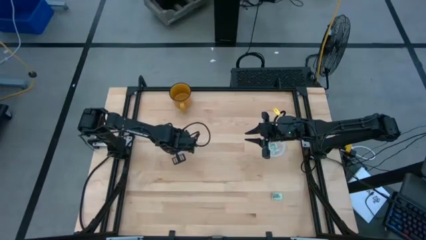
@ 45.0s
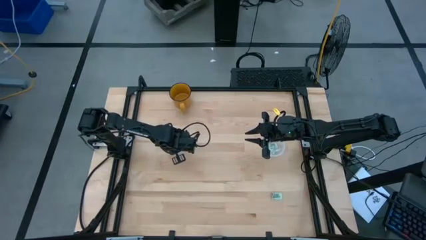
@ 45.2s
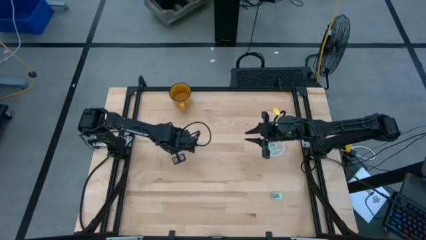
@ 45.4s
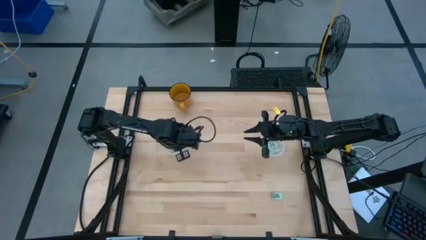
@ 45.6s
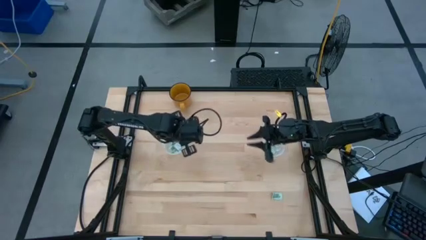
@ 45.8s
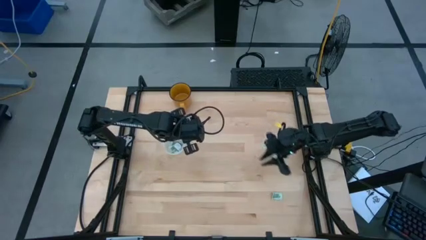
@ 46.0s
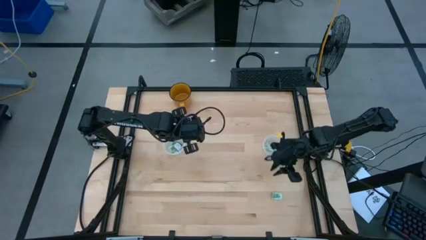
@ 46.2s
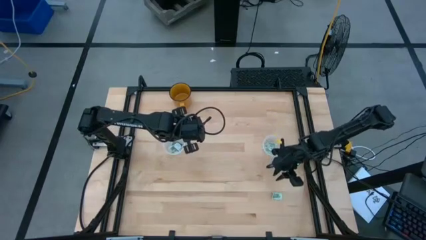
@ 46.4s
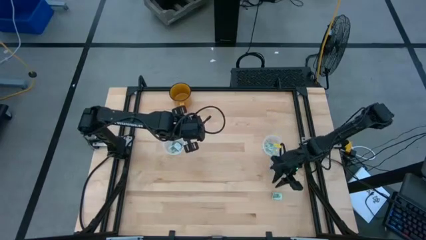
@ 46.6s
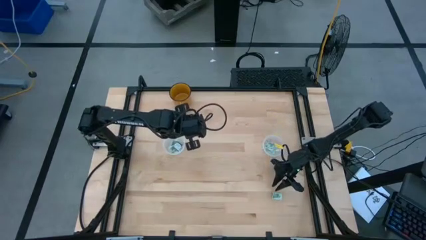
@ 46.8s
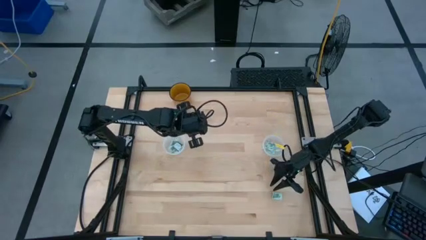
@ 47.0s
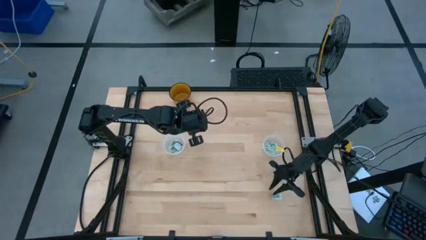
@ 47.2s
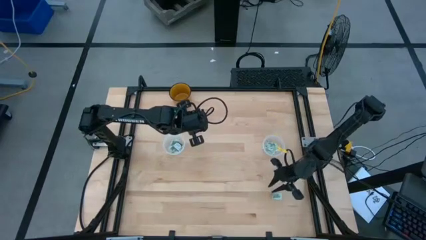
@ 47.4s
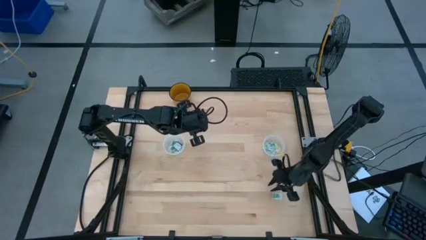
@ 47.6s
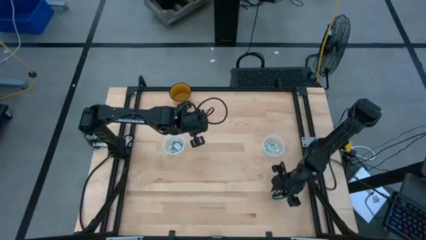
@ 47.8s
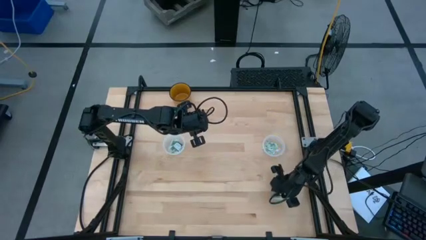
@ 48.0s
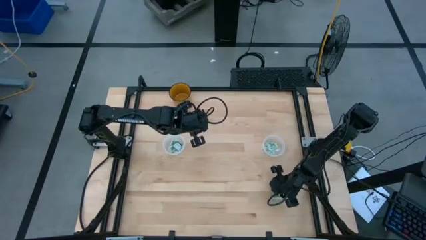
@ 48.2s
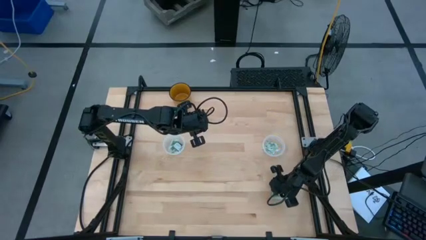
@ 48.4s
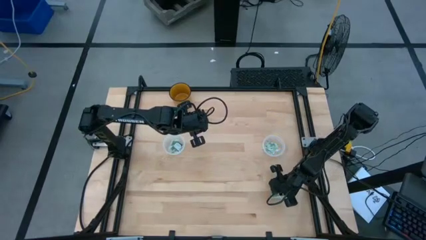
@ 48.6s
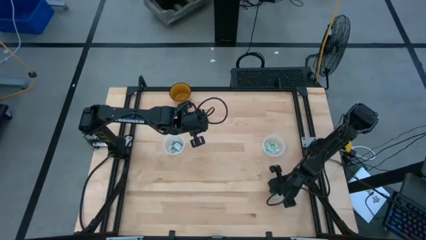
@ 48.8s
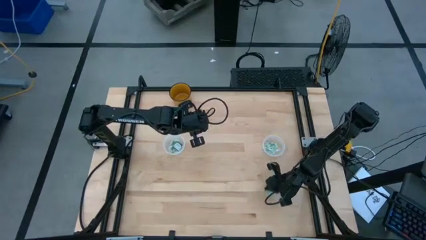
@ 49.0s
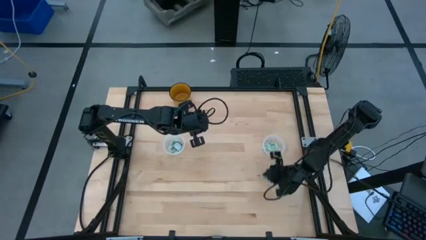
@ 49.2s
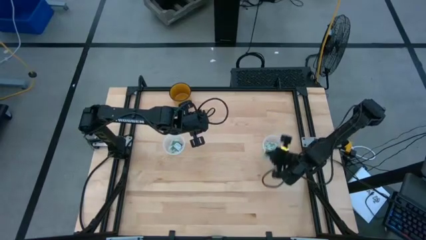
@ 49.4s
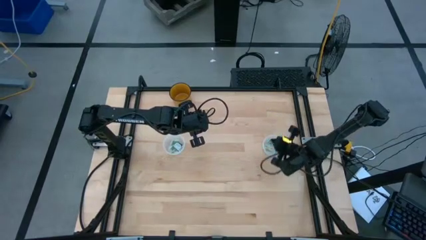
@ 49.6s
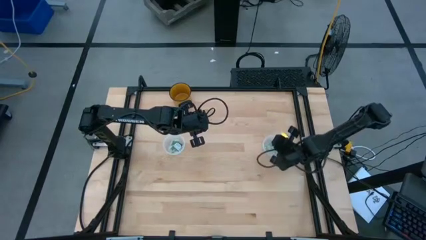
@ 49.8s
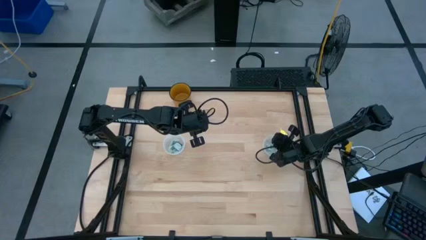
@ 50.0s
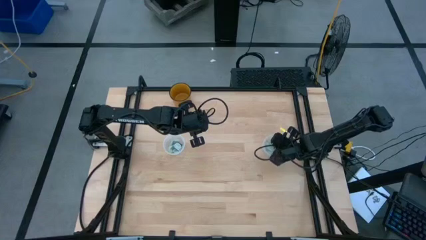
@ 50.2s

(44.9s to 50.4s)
Task: Pick and place items into bin
Put the stevia packet into the right transparent bin

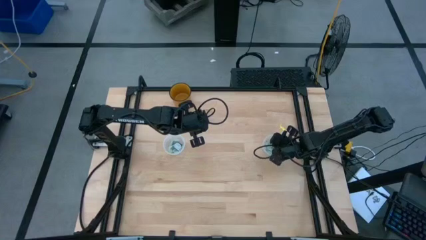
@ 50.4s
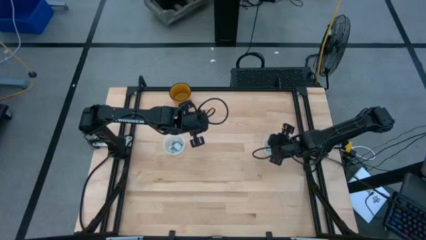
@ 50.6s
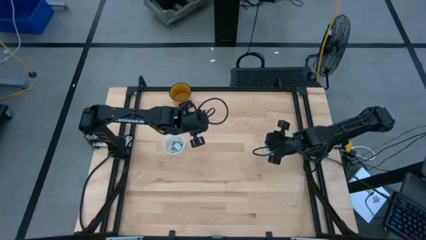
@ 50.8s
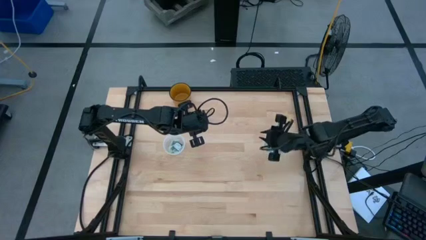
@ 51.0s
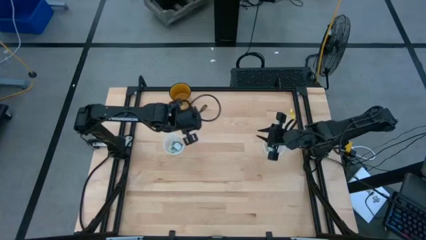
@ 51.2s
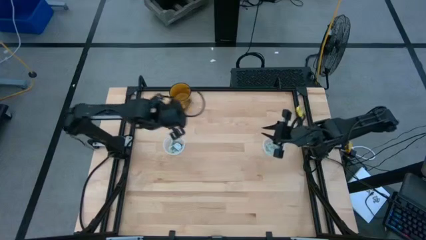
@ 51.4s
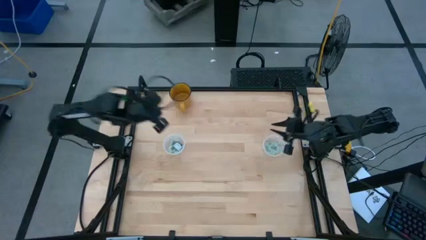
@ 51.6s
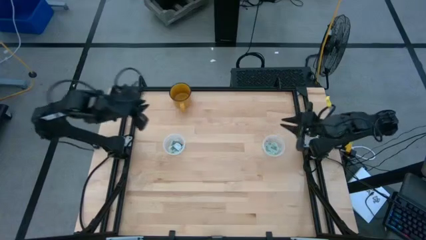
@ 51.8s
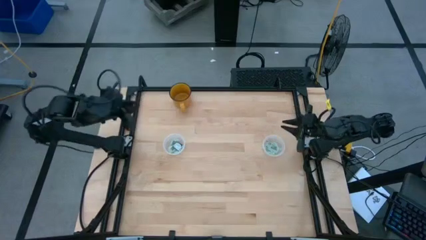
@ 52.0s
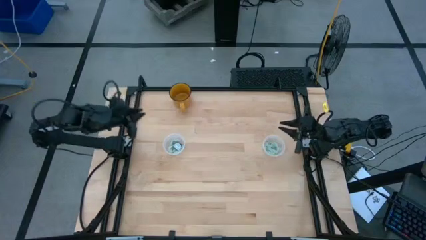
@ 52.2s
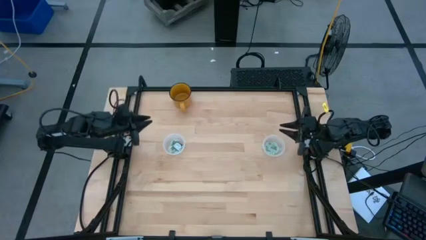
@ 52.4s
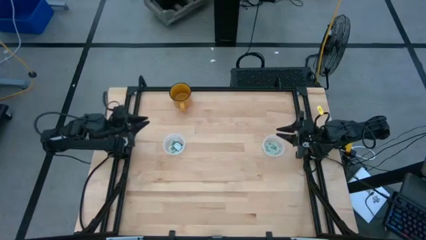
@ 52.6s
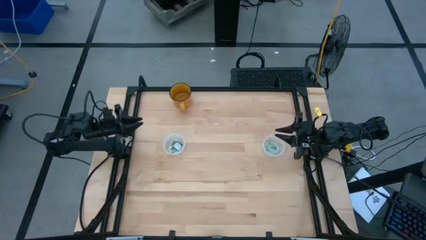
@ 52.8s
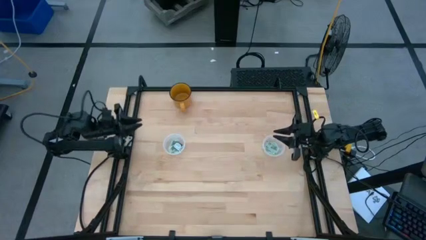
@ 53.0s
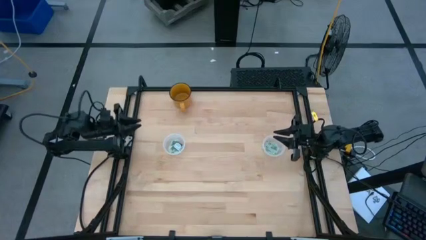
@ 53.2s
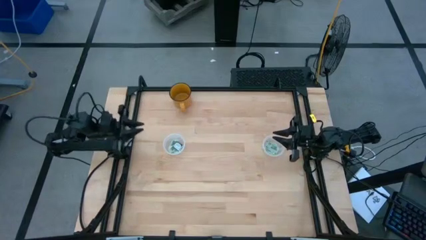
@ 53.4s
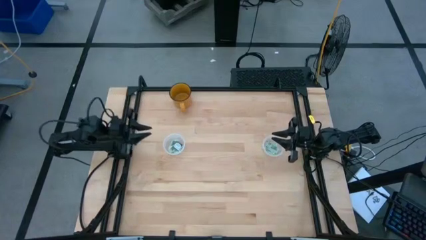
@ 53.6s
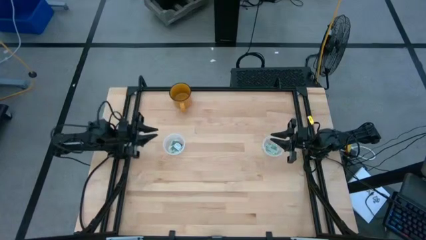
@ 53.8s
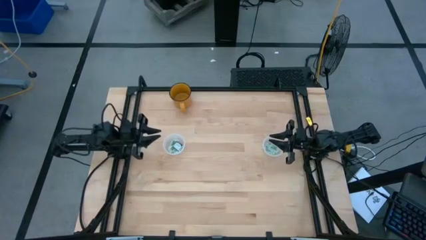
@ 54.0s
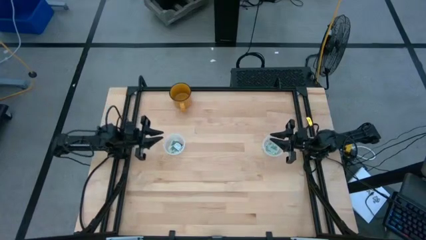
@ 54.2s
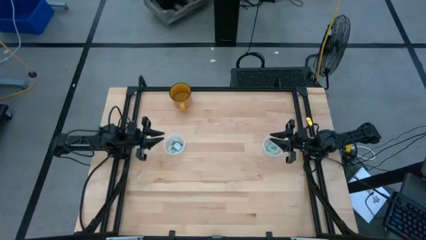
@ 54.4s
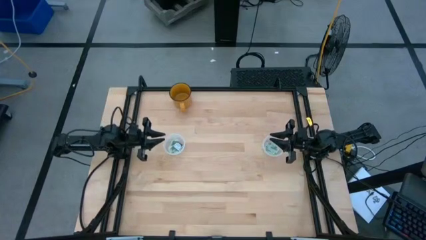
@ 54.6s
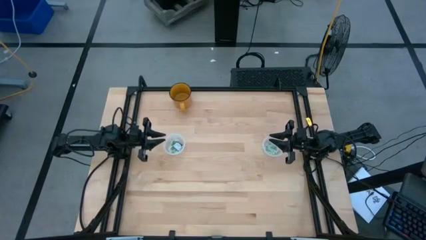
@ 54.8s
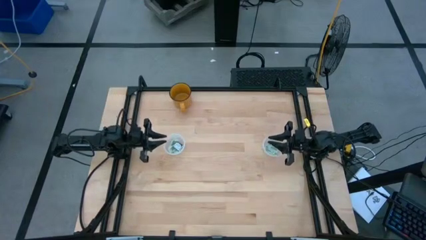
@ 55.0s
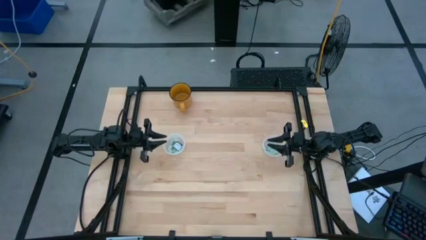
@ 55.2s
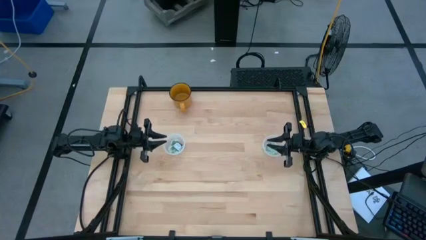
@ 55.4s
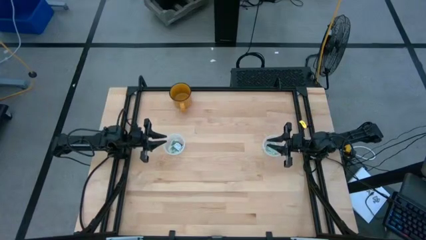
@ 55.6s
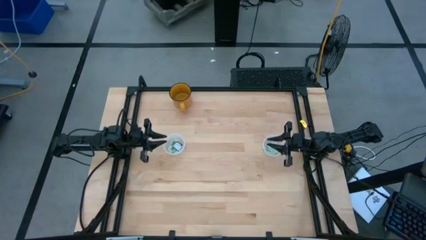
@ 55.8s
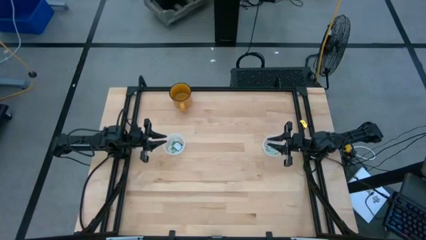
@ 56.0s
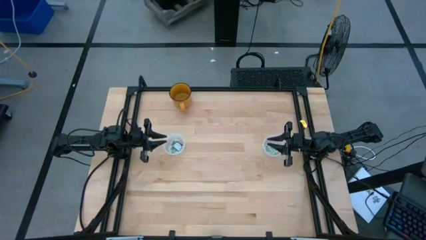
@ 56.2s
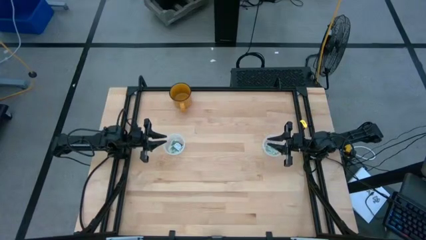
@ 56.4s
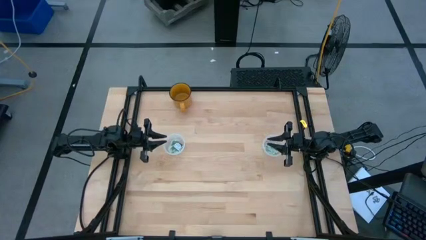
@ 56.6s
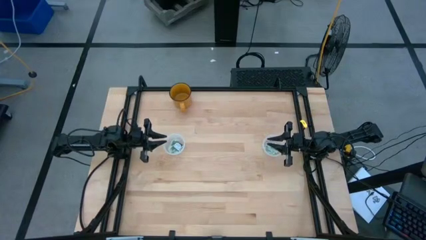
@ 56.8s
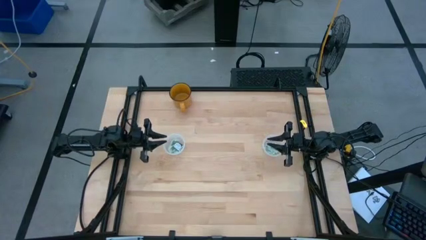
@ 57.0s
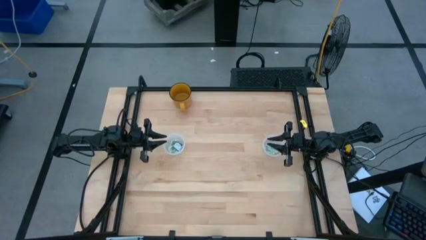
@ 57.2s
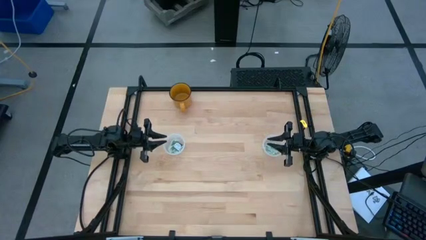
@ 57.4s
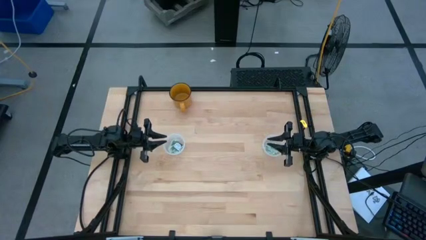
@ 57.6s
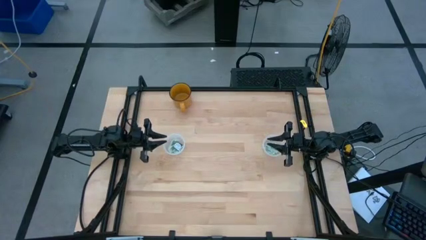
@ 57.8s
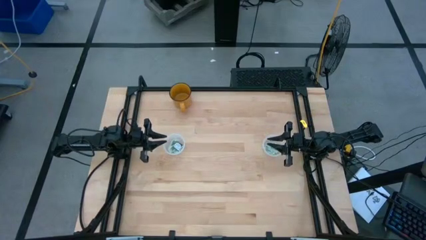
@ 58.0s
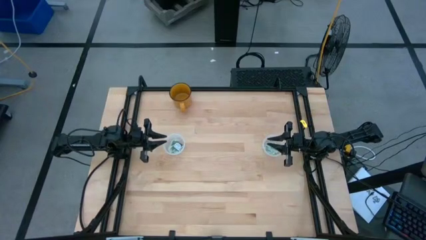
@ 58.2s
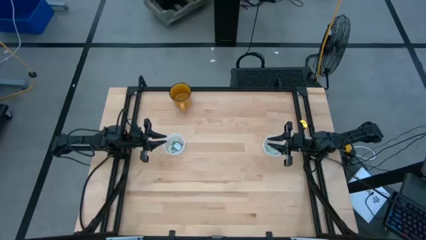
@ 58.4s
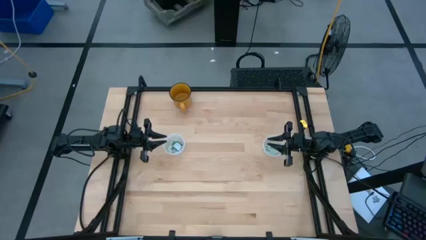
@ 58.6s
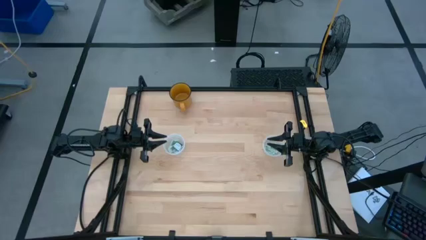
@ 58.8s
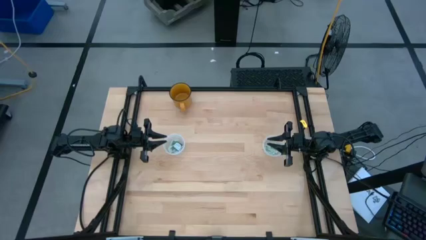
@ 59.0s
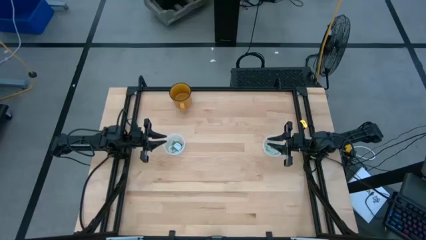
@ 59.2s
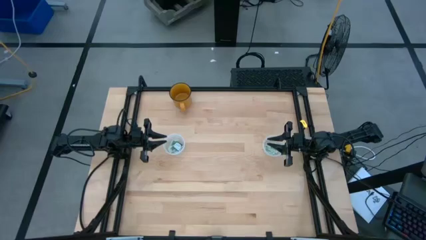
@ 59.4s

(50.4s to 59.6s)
Return to Home Position

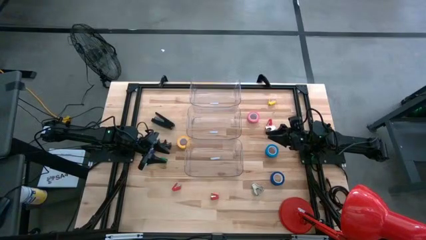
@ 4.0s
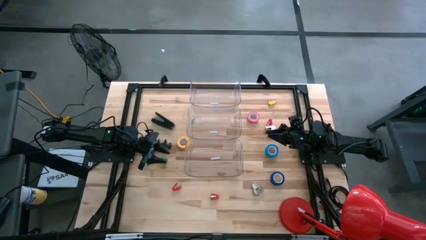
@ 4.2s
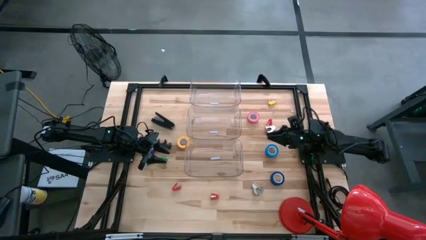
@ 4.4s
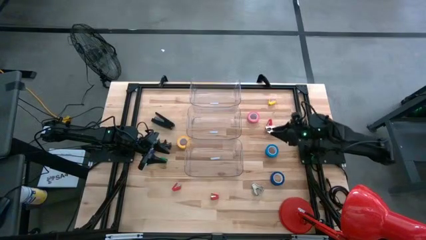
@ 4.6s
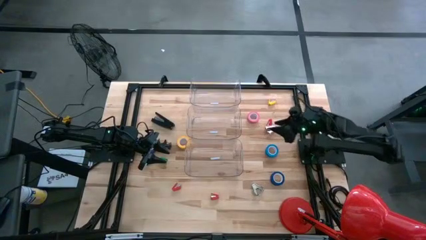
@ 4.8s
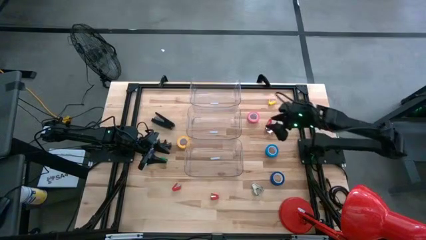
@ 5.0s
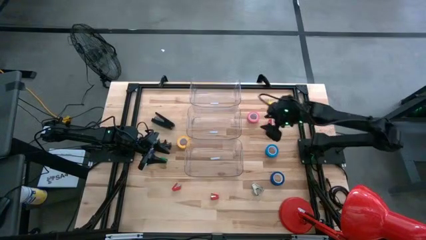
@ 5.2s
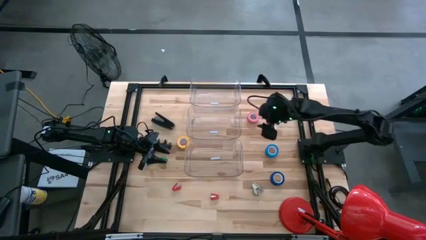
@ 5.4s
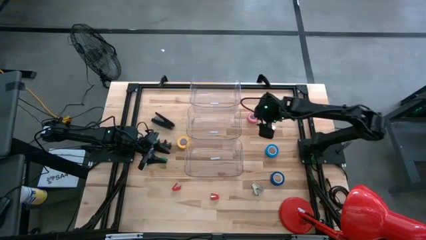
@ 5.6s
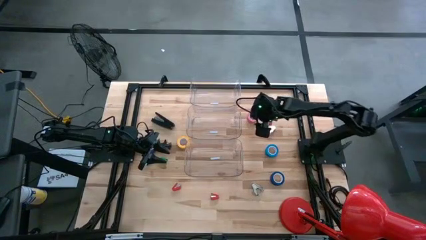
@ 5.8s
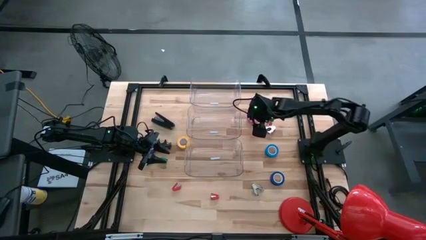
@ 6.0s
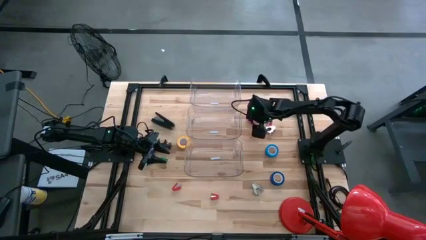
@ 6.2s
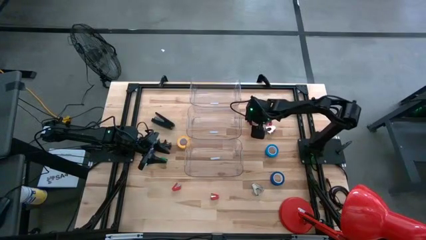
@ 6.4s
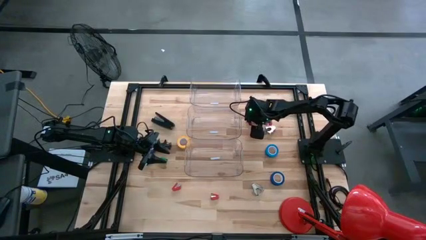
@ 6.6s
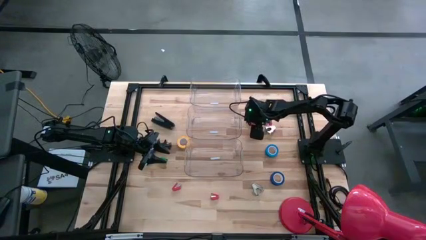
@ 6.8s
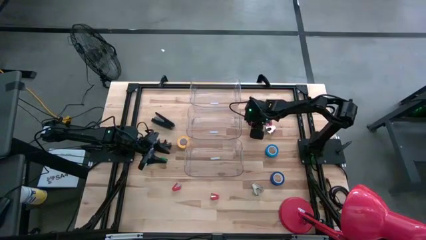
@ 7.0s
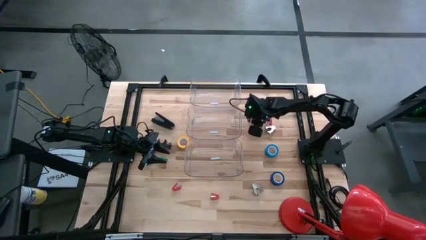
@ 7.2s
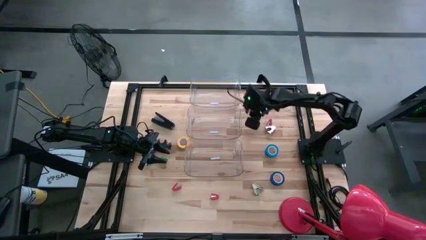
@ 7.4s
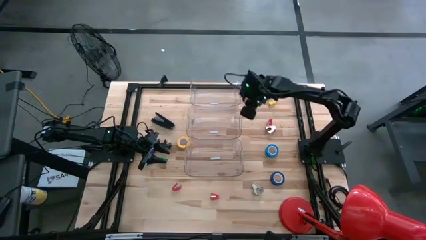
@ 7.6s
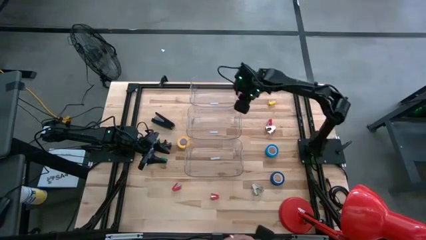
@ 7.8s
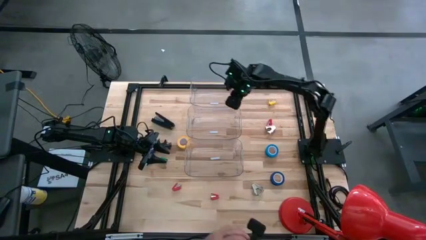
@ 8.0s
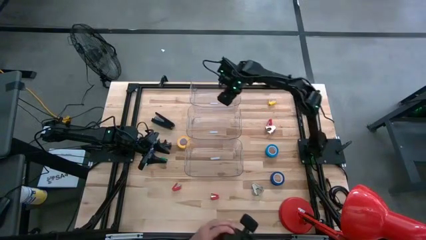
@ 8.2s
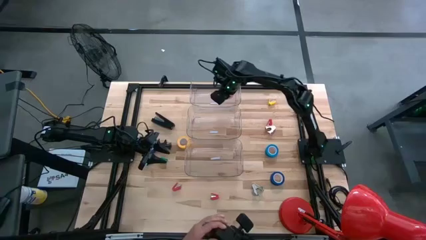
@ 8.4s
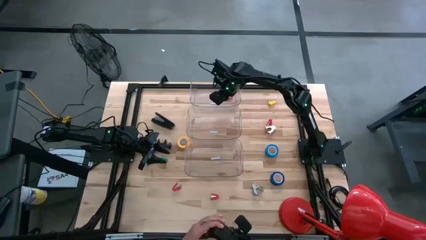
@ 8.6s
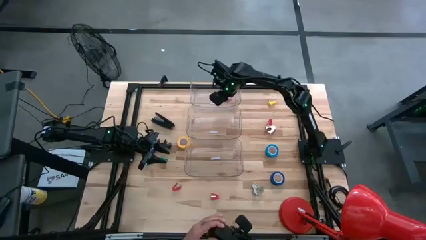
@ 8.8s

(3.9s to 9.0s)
Task: Pick and place Stapler, Stapler remover, tape
Put the pink tape into the top transparent bin
